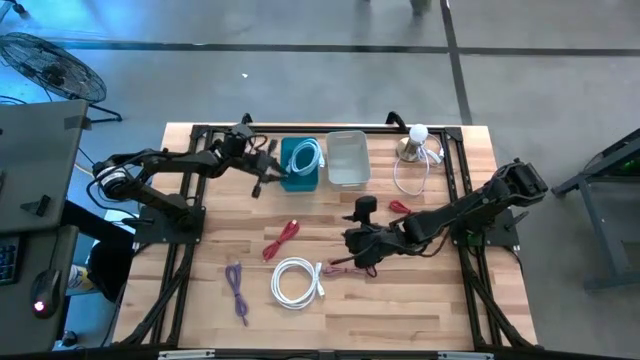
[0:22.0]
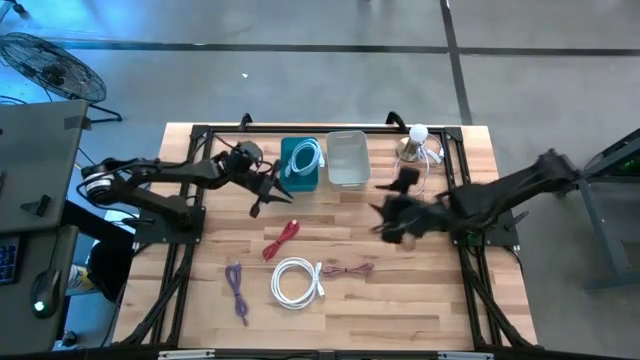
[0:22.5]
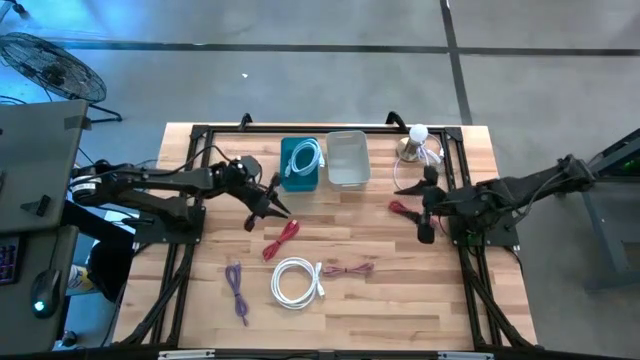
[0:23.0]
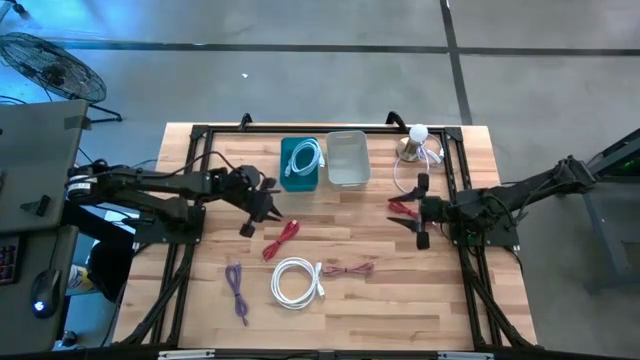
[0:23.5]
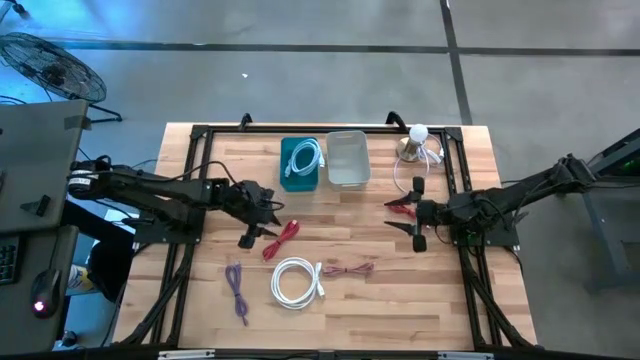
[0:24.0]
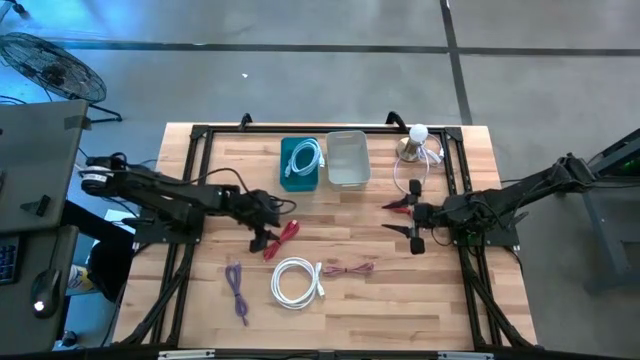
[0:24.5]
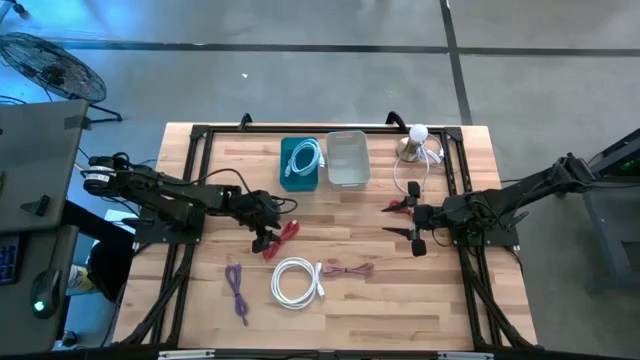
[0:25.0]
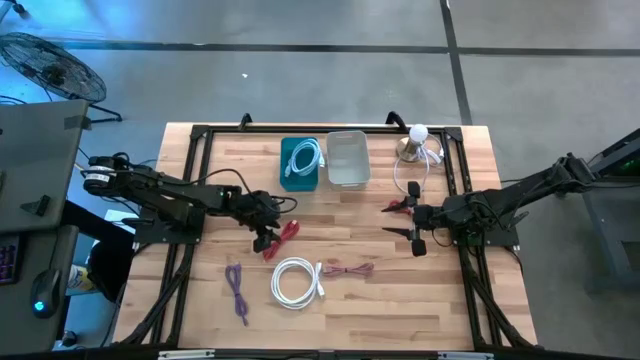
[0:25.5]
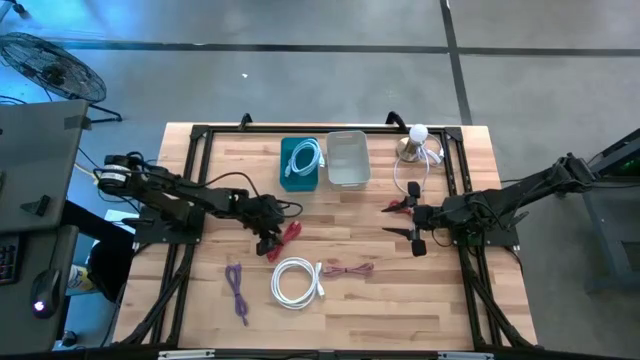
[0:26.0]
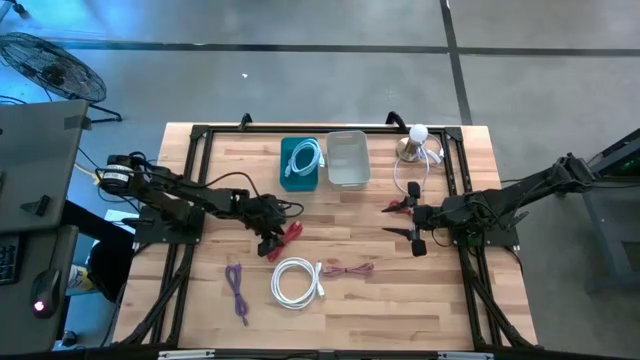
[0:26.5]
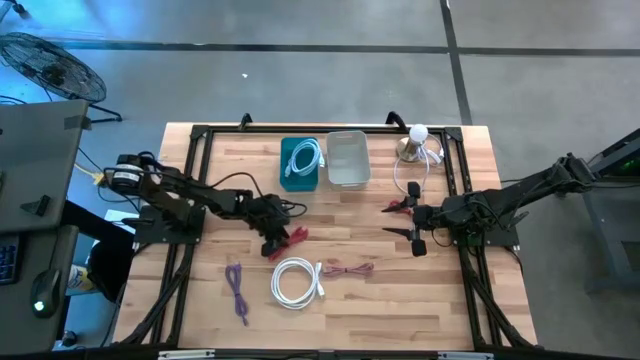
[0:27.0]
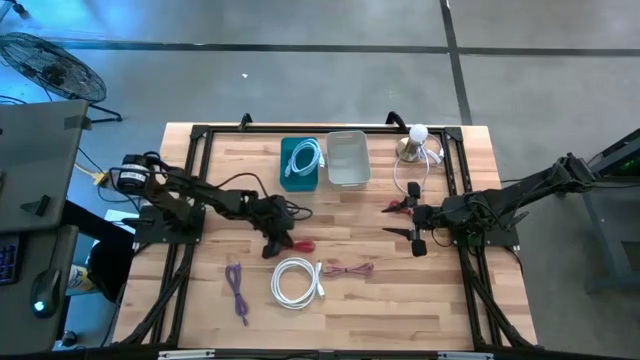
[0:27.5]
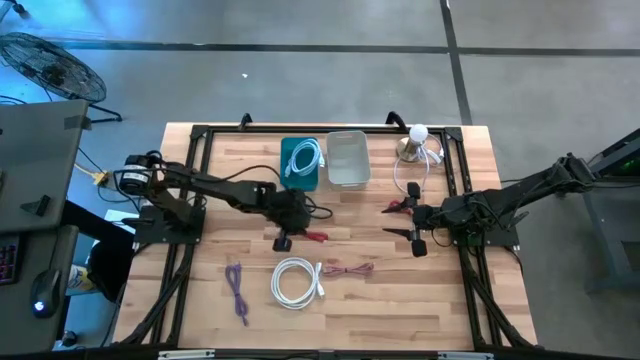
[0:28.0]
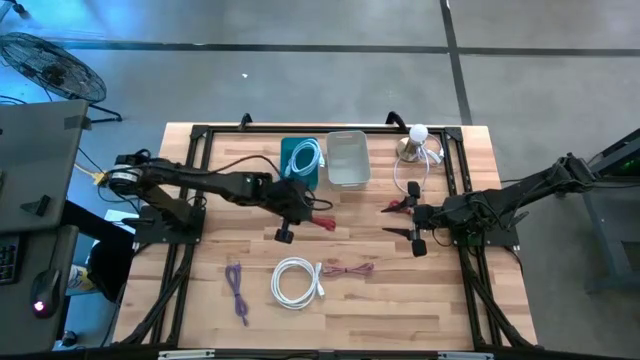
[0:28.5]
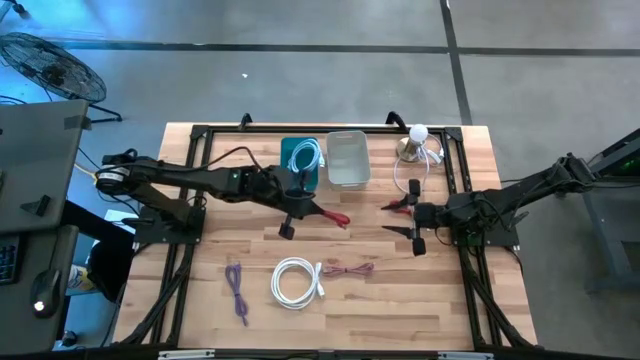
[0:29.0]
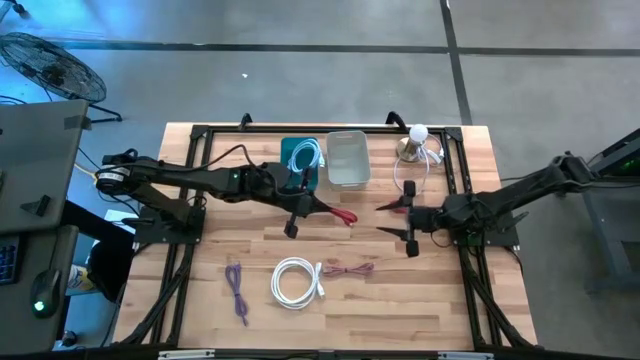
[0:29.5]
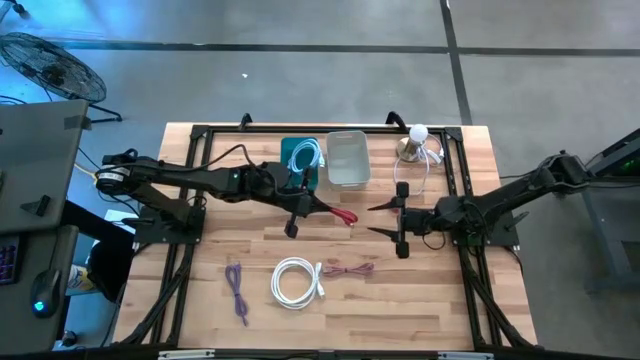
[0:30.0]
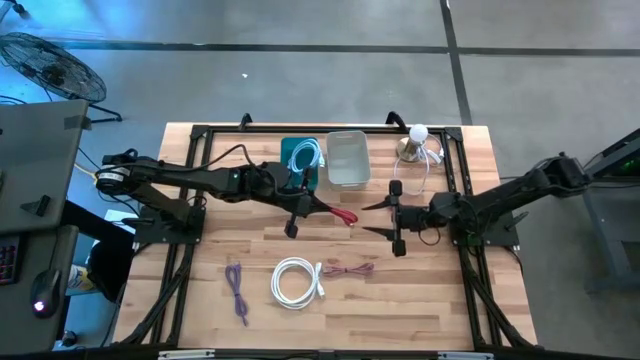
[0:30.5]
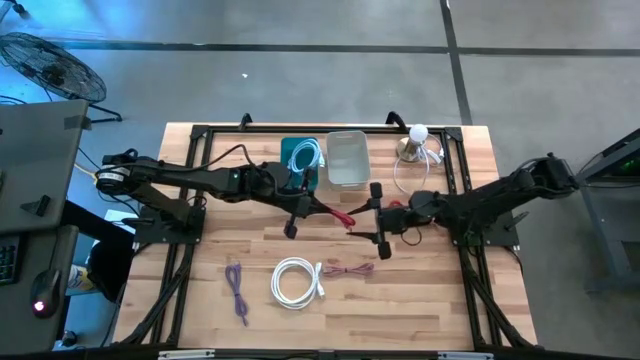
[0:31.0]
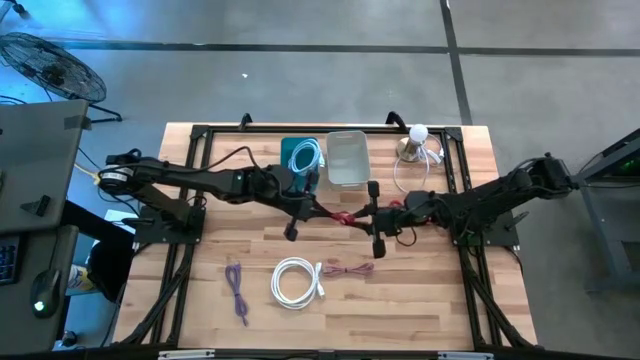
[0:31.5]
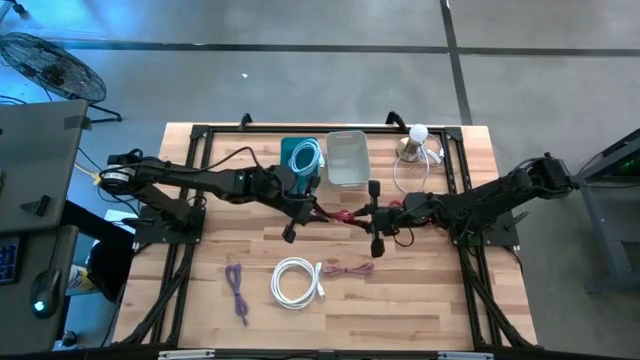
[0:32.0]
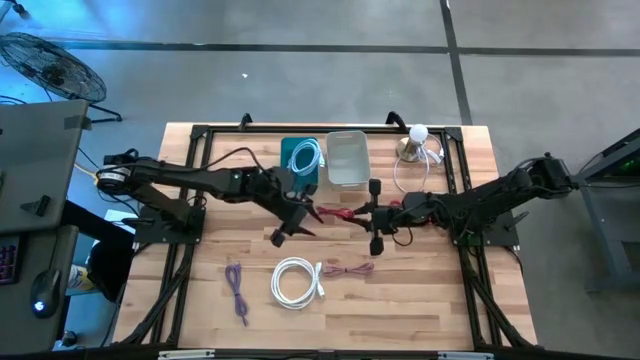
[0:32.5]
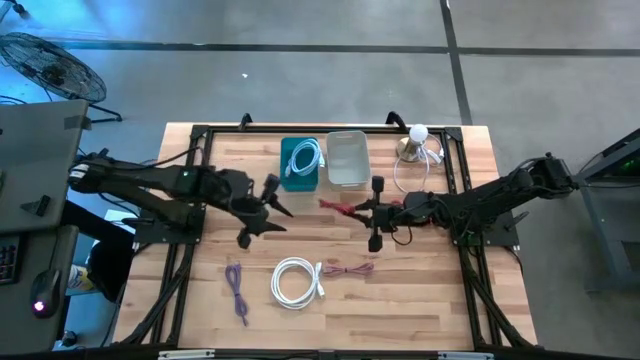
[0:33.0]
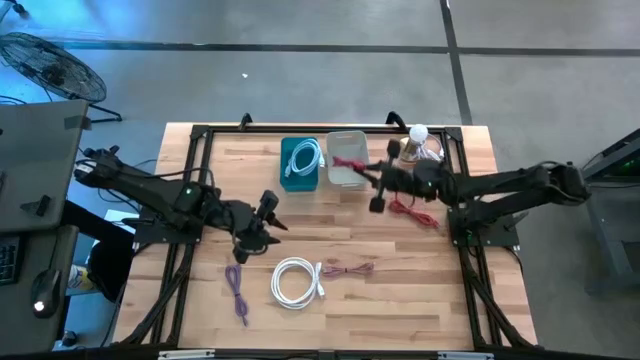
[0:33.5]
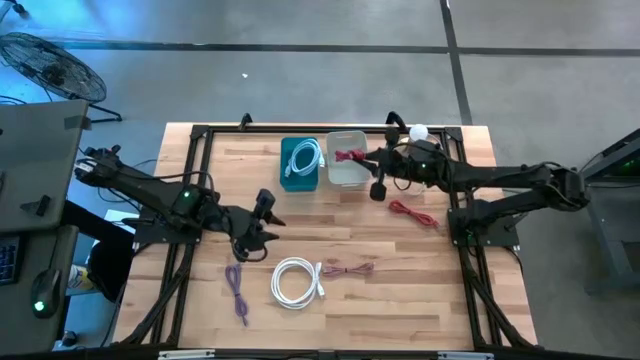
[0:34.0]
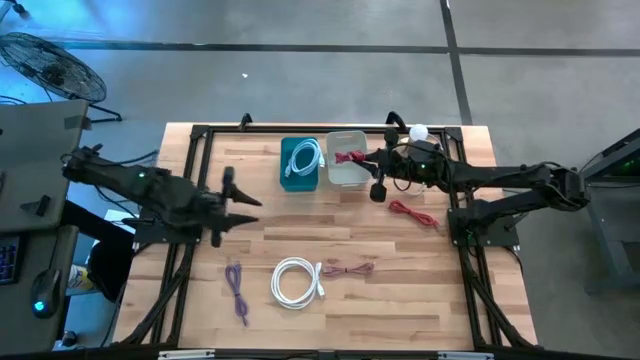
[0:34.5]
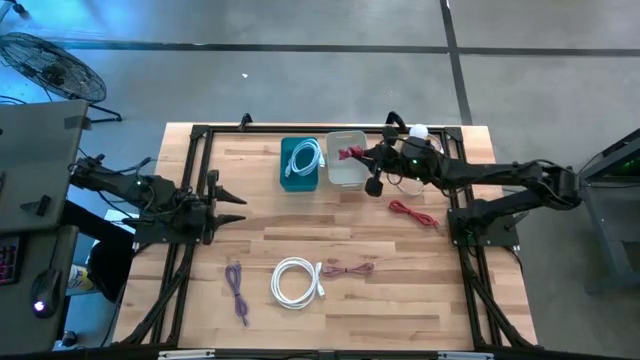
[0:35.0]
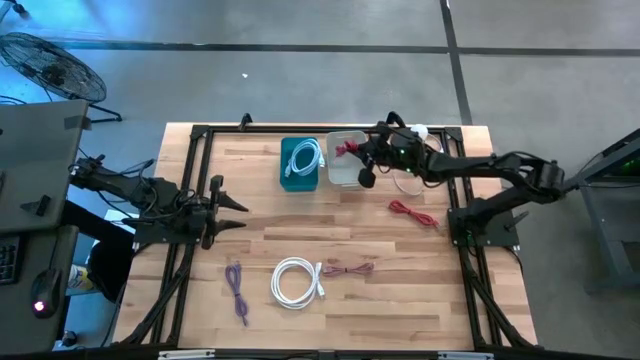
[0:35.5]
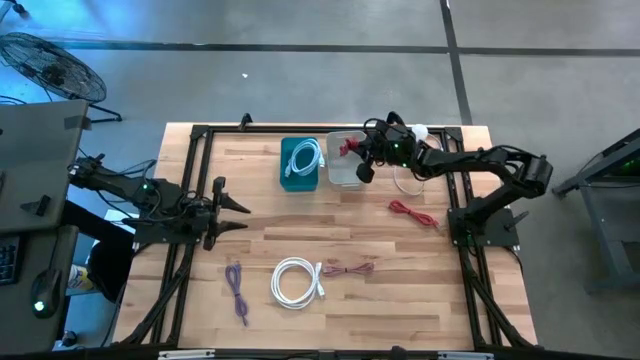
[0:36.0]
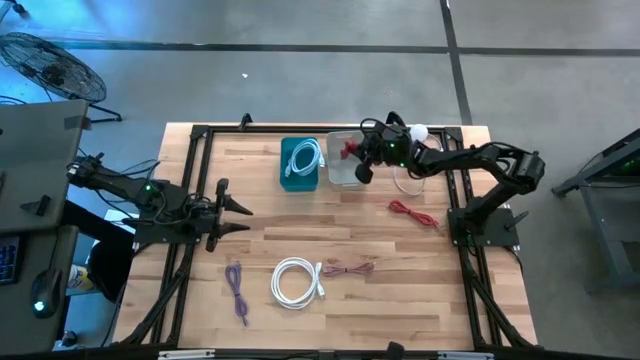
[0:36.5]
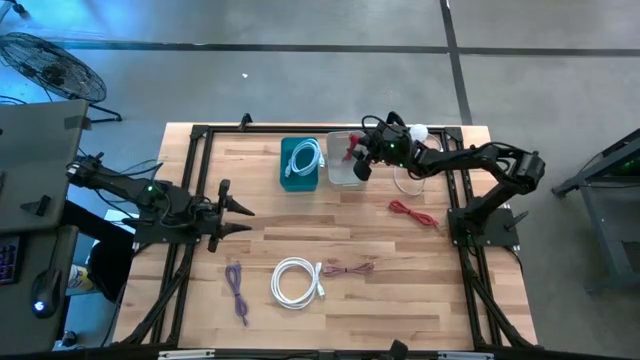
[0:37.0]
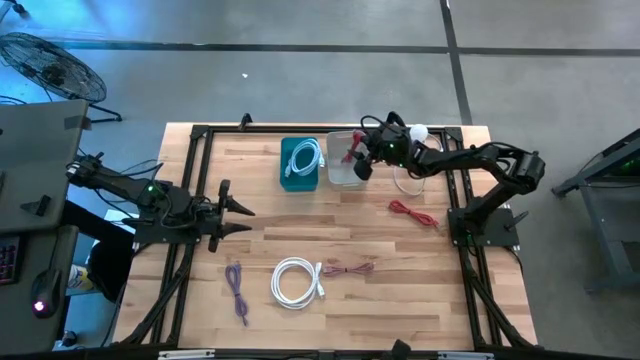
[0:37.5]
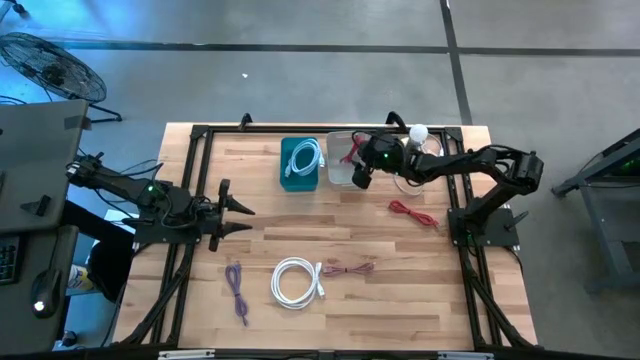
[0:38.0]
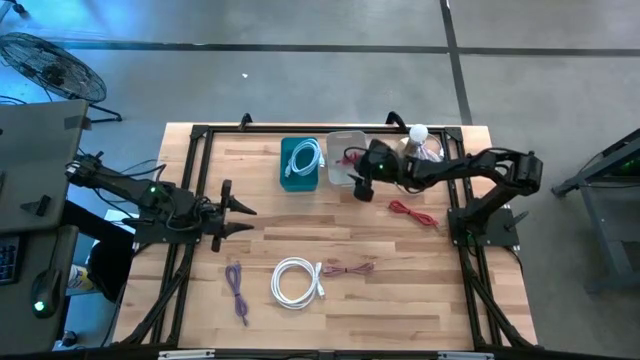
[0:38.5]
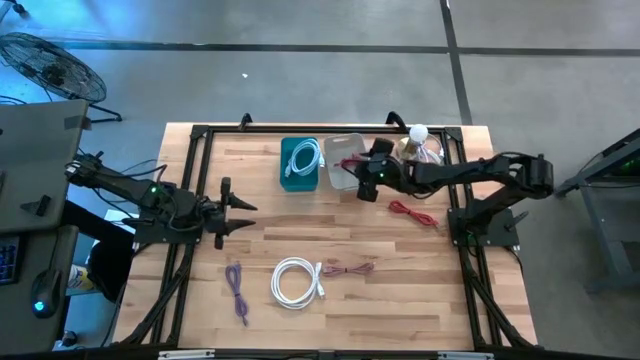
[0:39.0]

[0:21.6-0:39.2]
Task: Pick & Place USB Port
Put the left orange charger cable into the gray bin

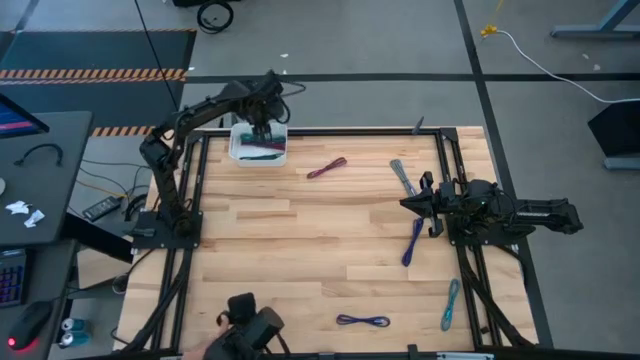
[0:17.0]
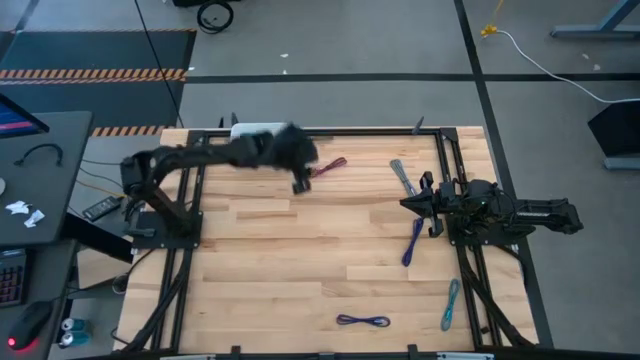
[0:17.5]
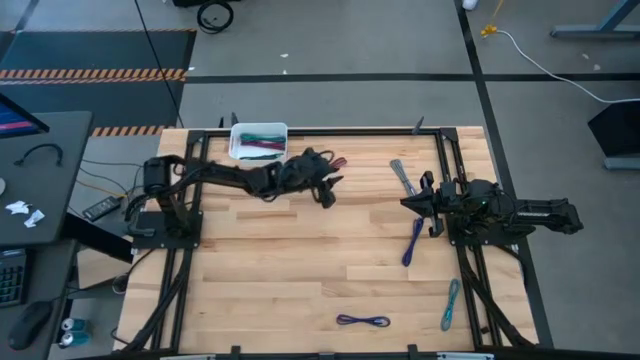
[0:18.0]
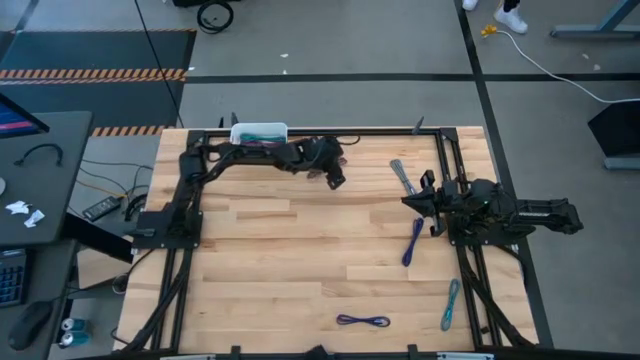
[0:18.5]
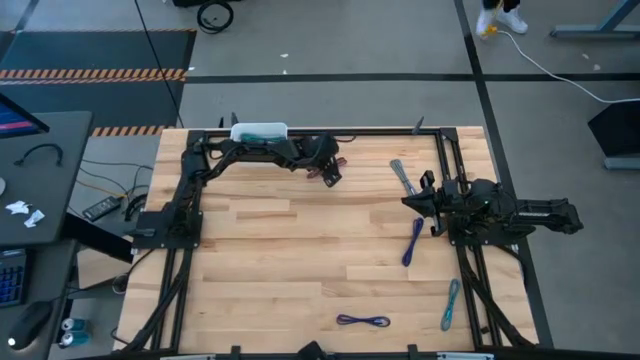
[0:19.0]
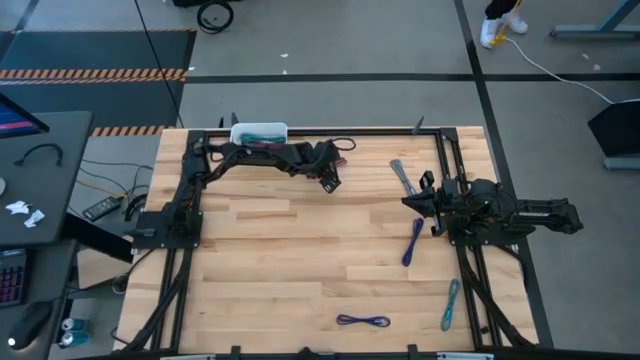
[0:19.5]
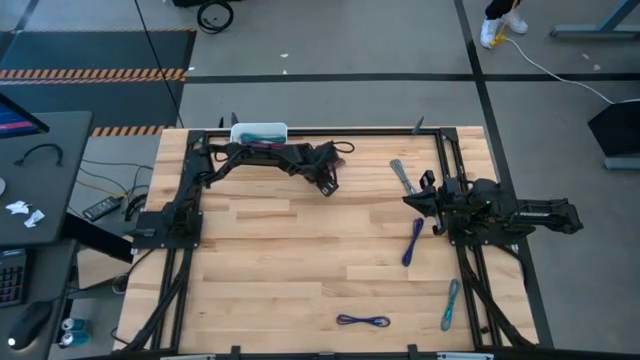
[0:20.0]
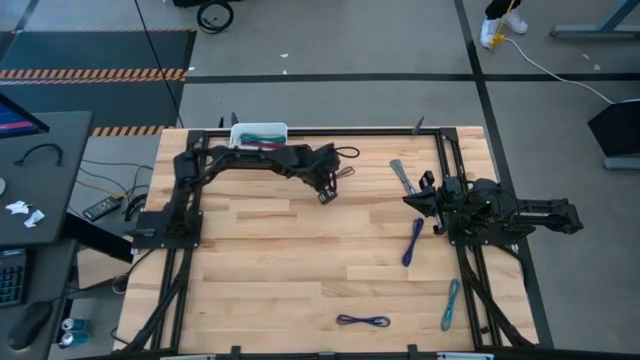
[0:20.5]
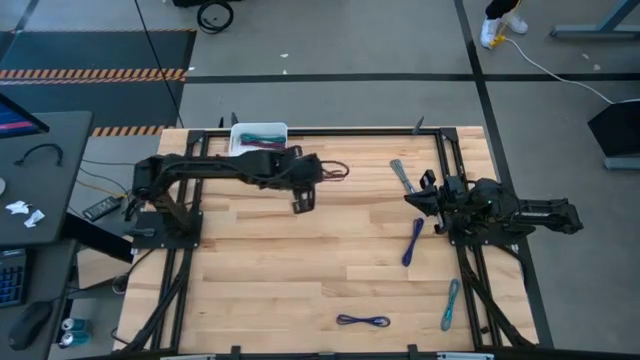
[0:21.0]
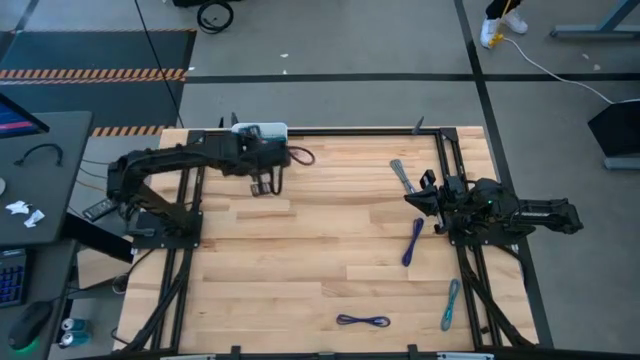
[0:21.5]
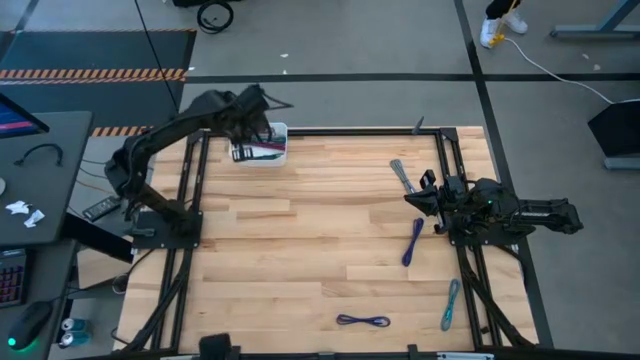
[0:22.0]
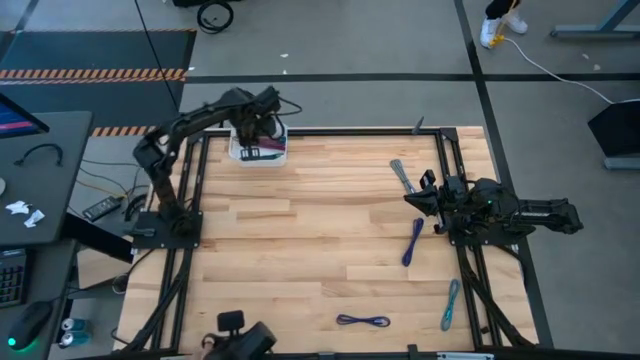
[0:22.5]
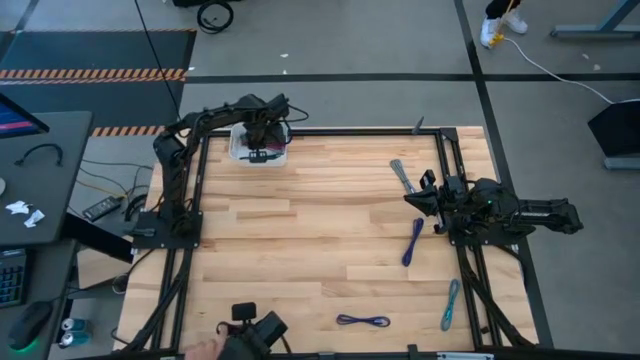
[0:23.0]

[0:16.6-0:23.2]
Task: Pick and place USB-C Cables
Put the pink USB cable into the white bin
